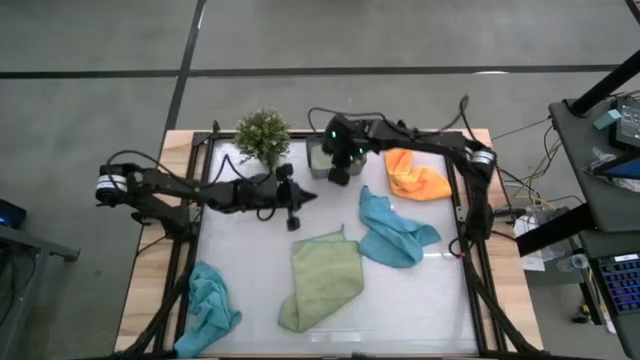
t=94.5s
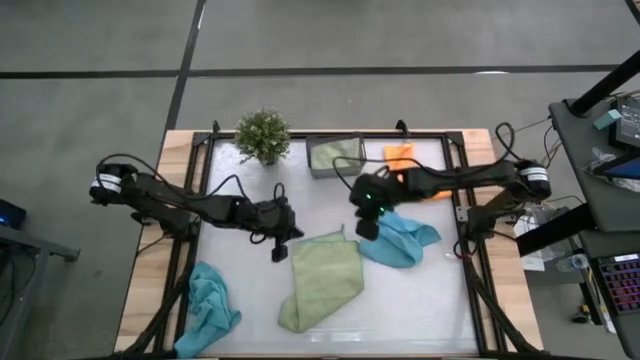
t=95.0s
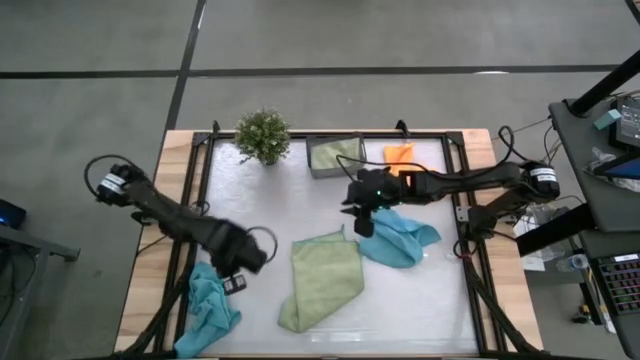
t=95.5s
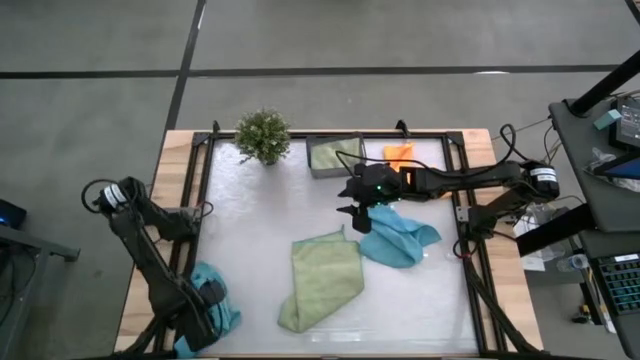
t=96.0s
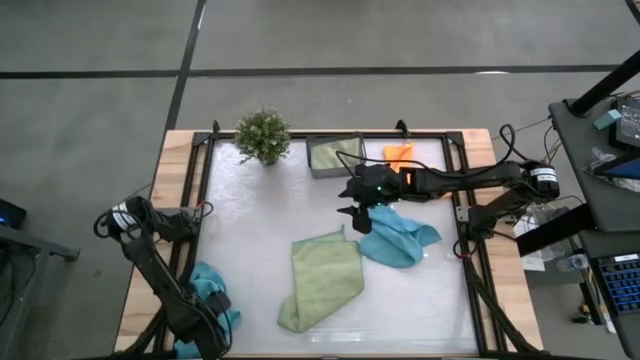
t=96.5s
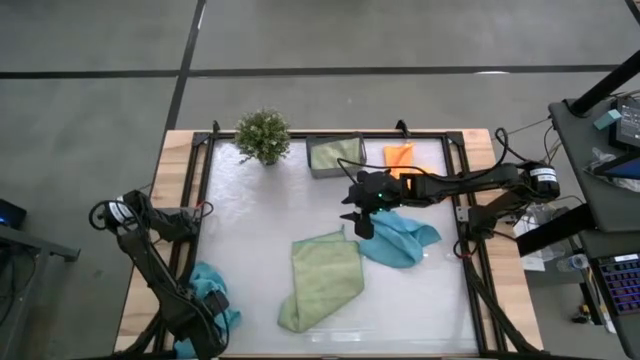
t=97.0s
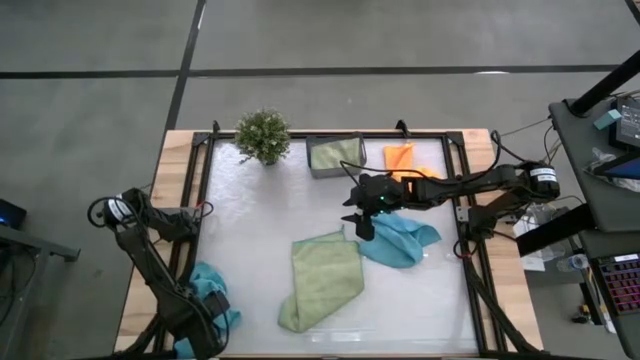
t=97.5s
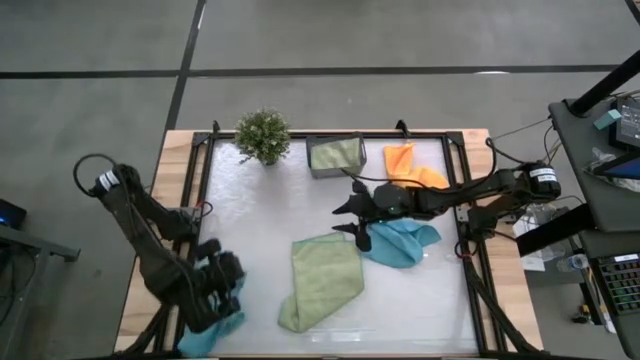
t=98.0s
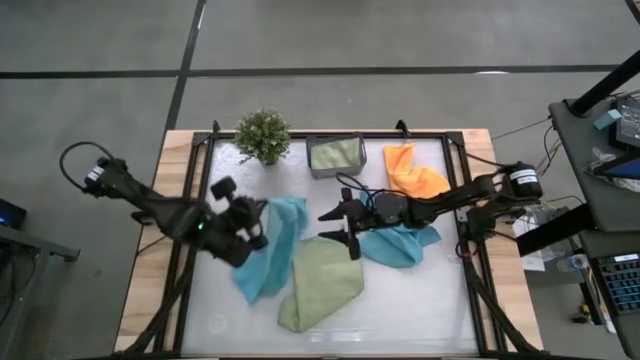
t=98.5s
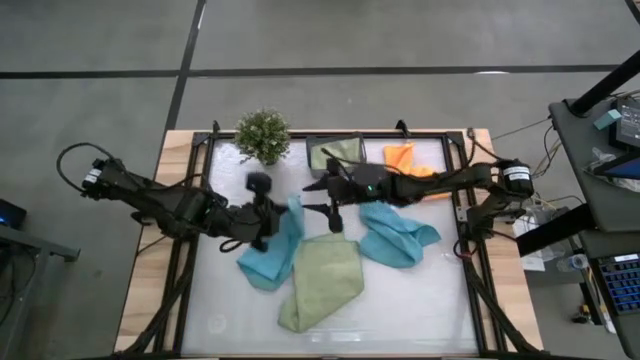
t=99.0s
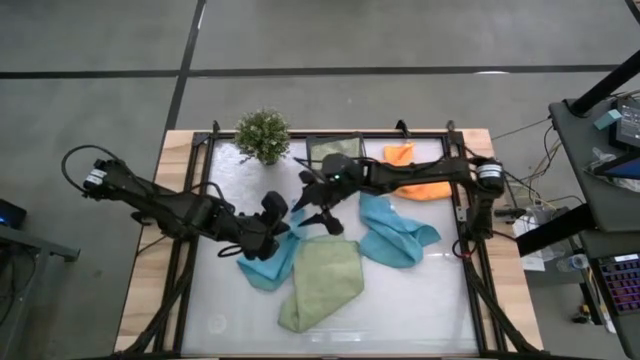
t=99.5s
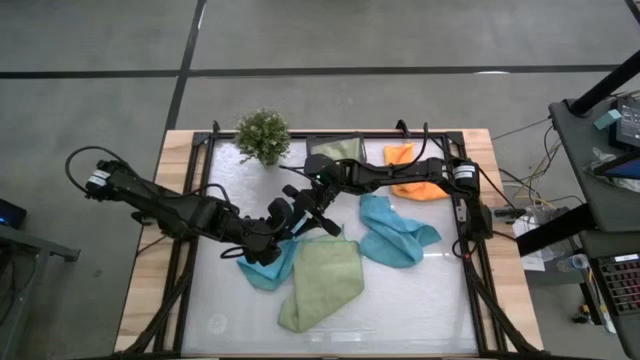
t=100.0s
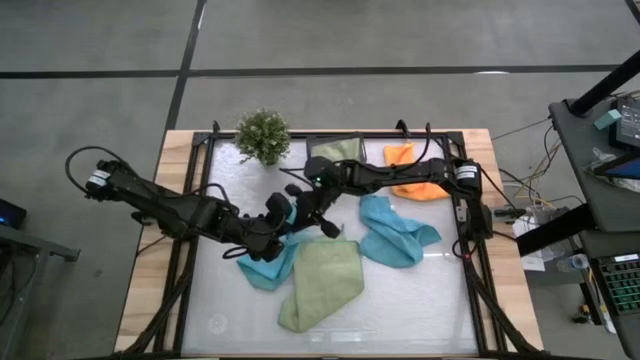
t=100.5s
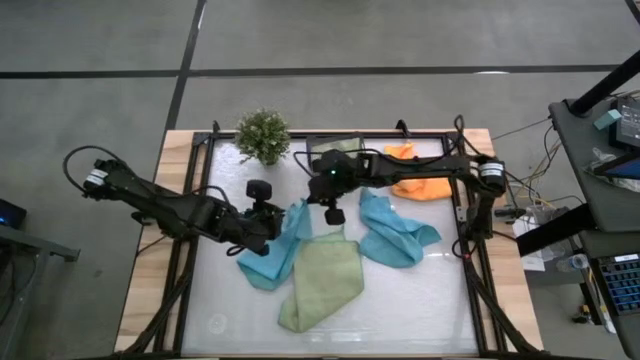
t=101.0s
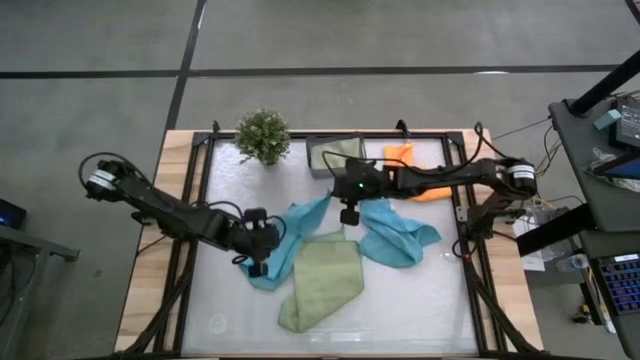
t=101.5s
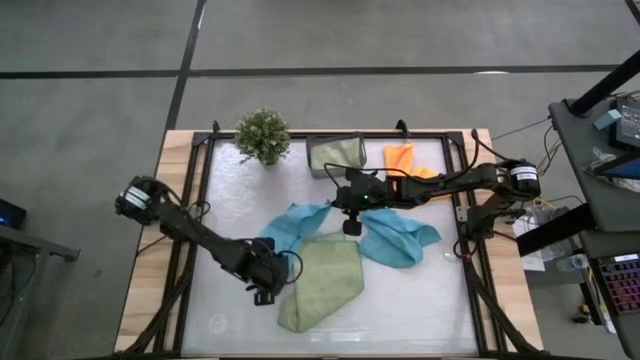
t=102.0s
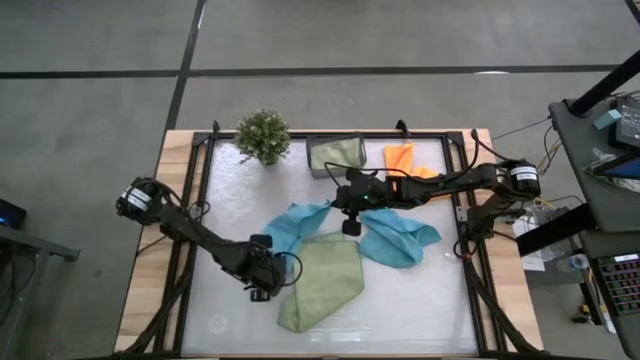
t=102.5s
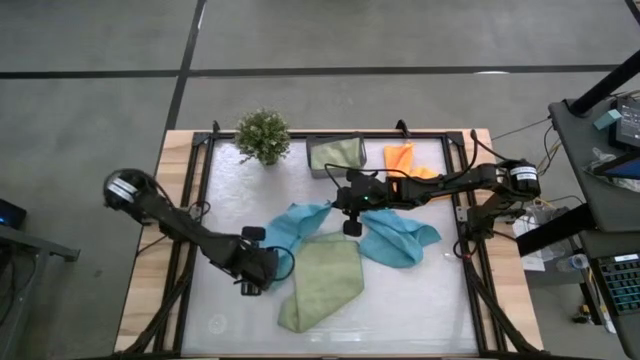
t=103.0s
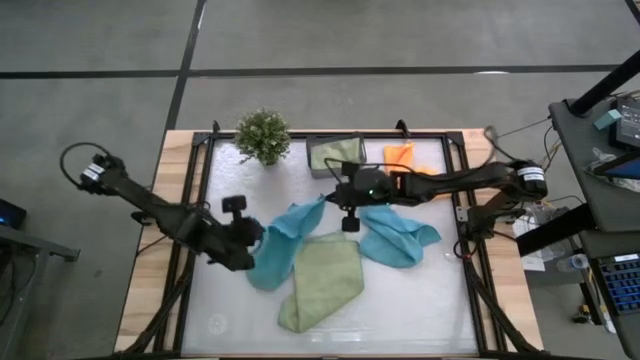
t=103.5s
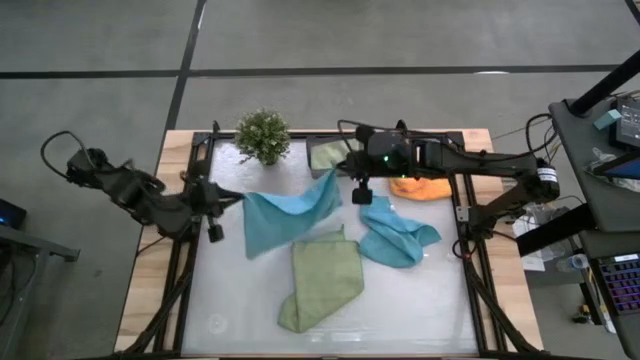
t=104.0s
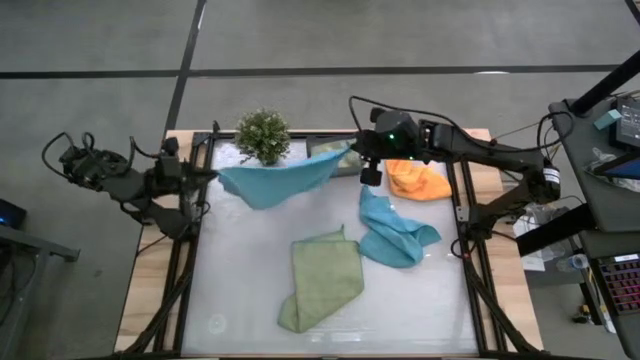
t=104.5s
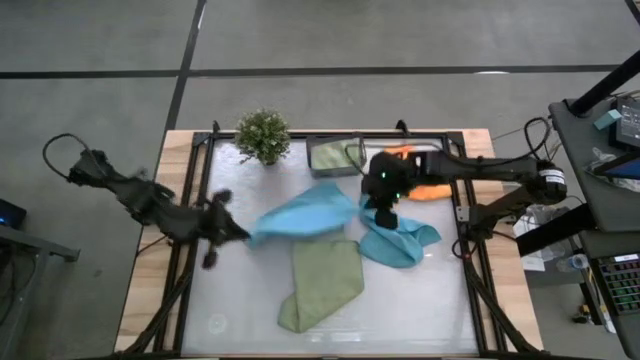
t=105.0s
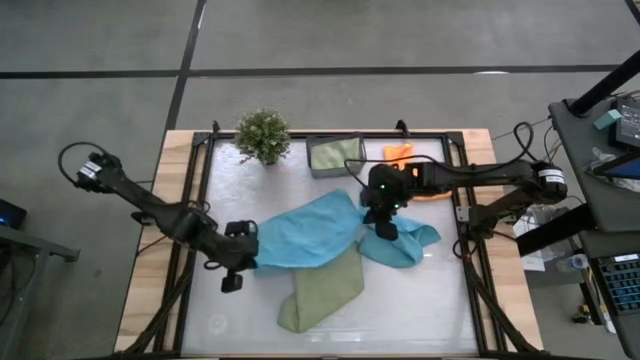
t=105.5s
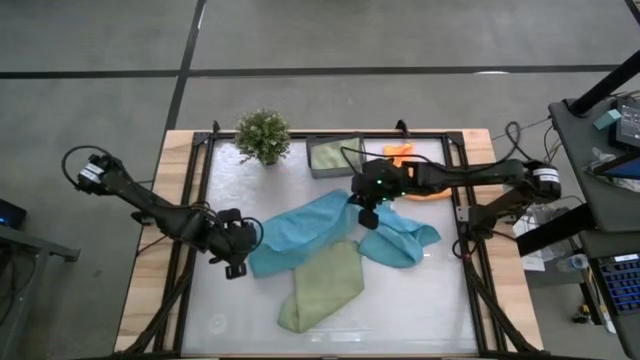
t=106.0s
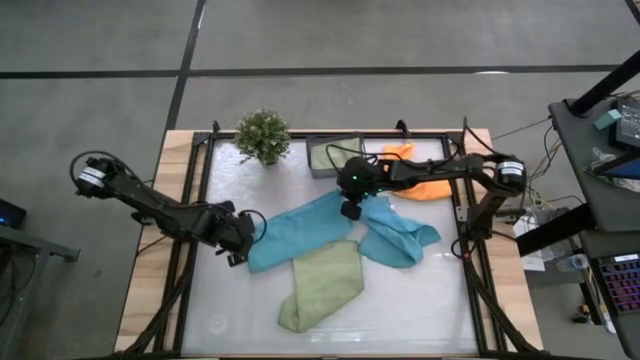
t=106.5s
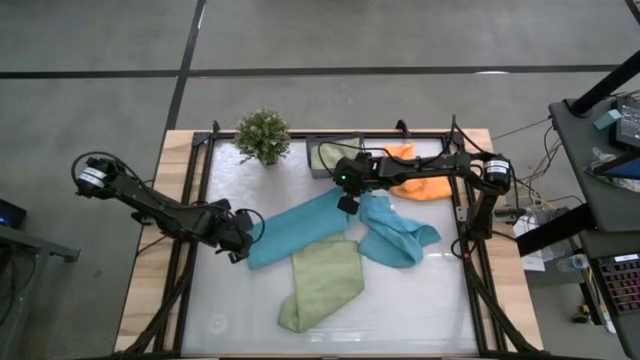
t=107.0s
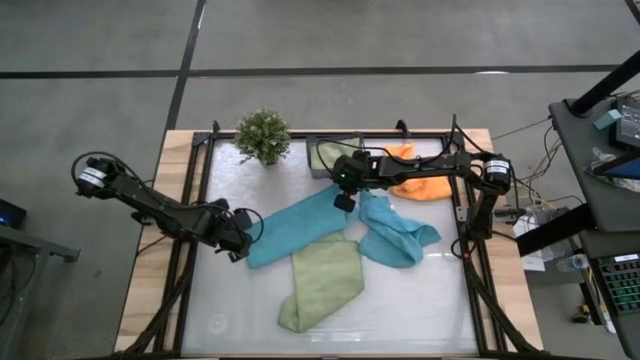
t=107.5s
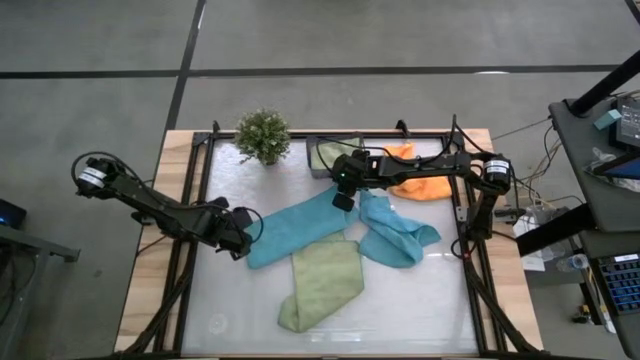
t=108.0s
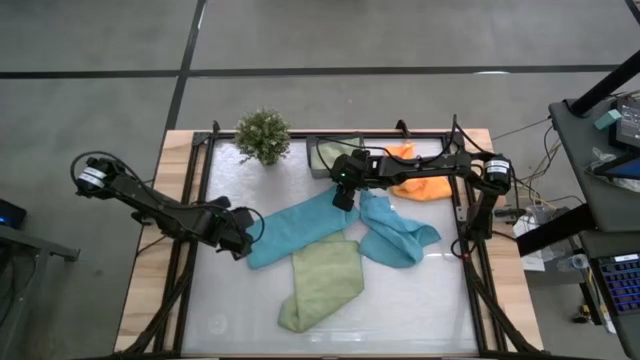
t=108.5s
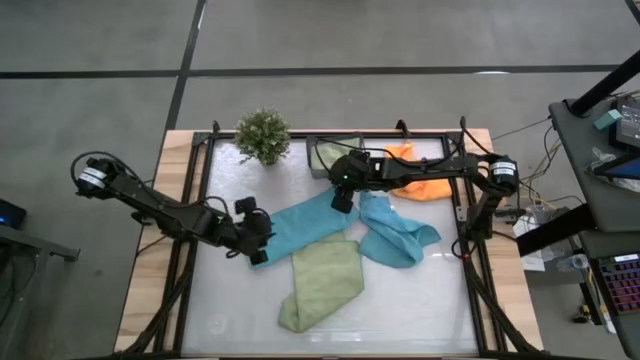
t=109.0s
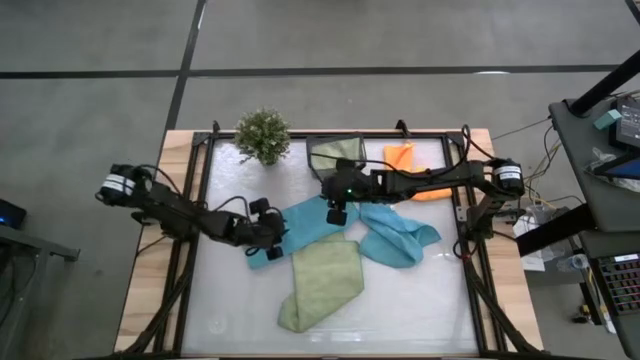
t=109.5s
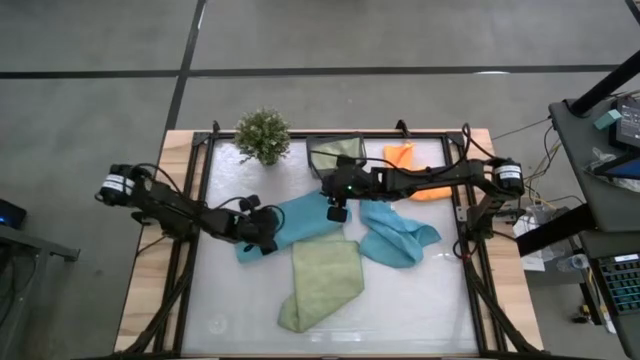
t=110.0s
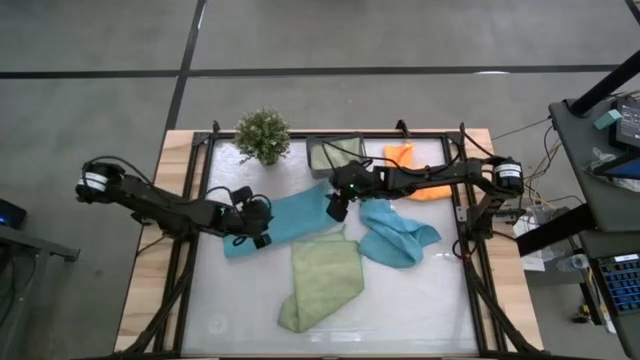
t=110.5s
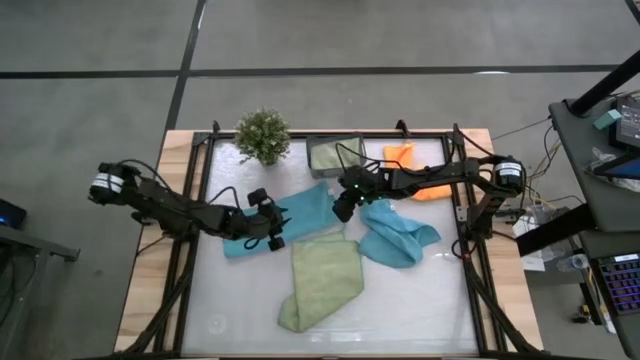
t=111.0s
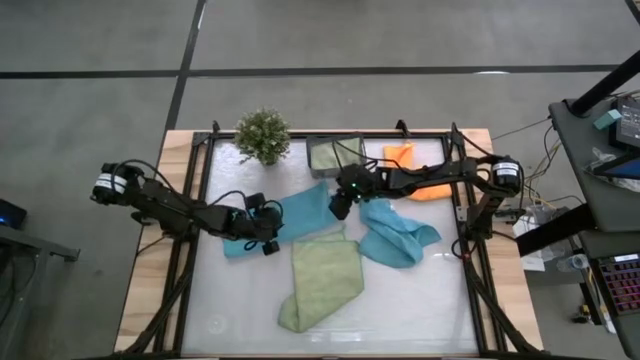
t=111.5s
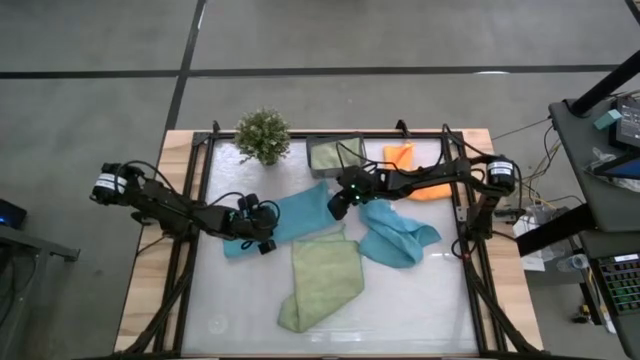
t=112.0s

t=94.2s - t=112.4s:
Task: Fold microfiber towels
Fold the left blue towel

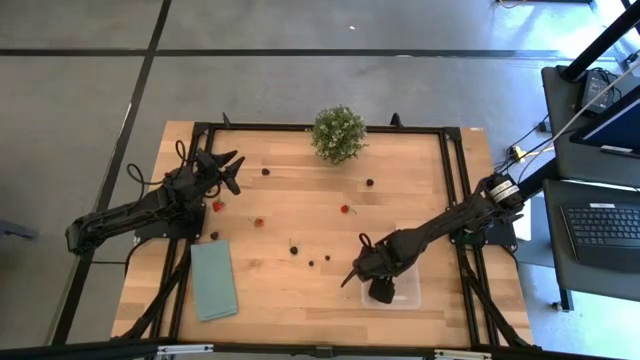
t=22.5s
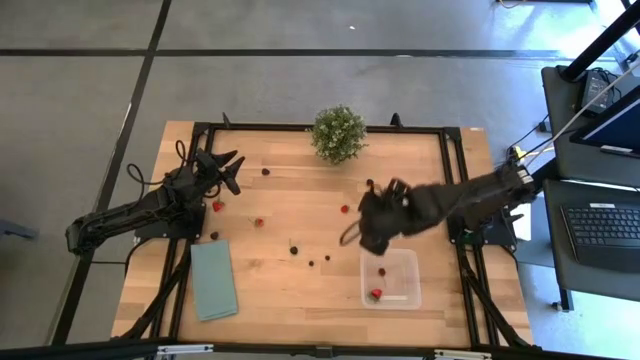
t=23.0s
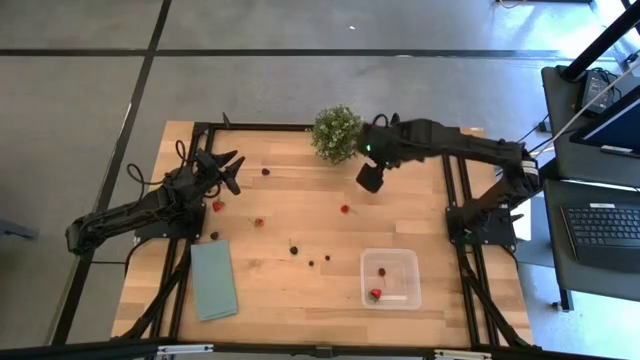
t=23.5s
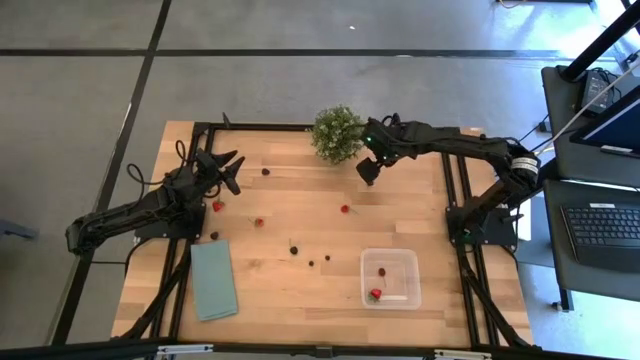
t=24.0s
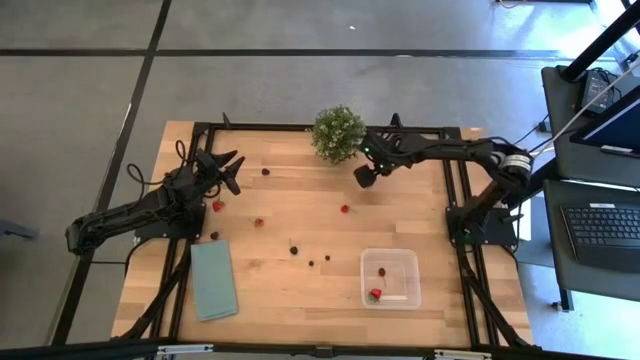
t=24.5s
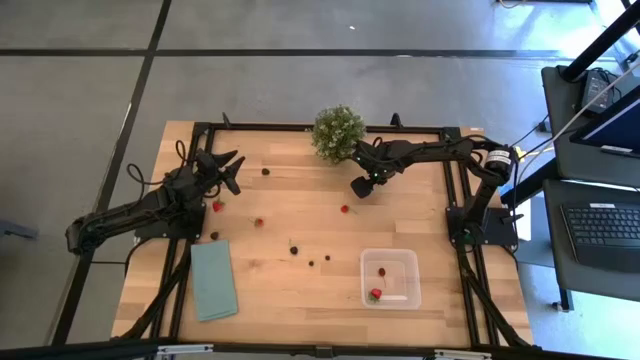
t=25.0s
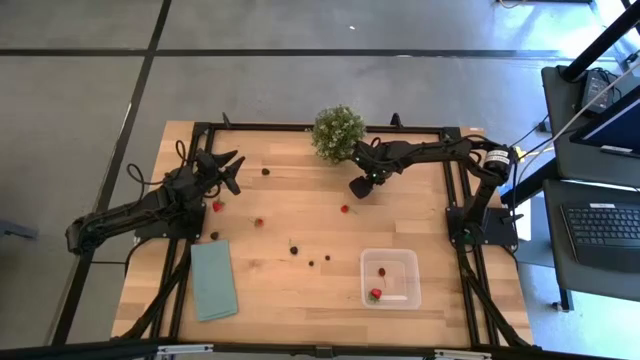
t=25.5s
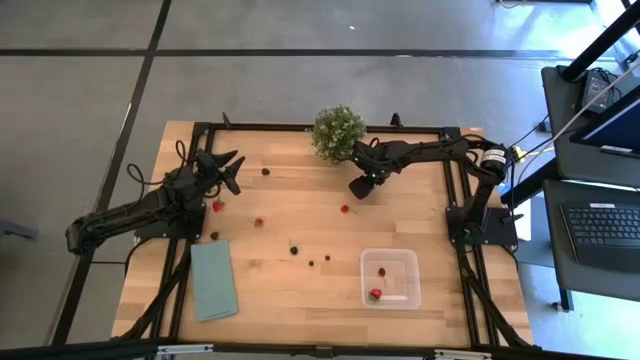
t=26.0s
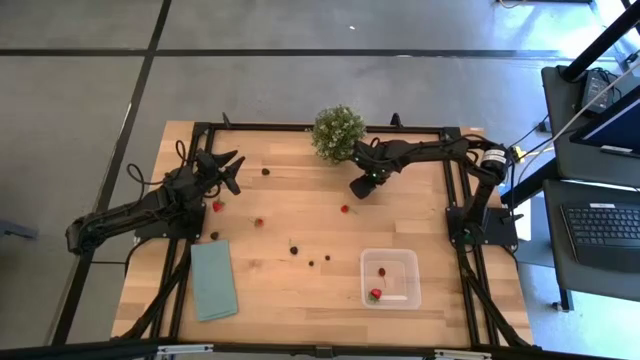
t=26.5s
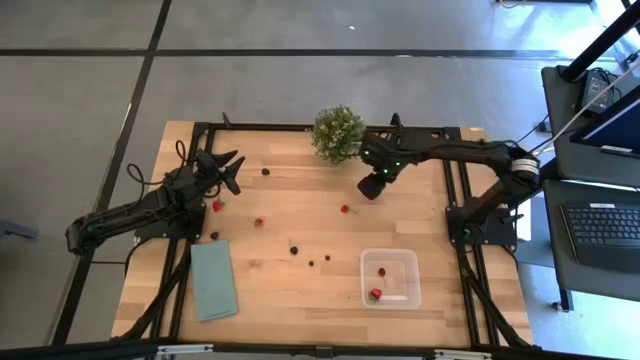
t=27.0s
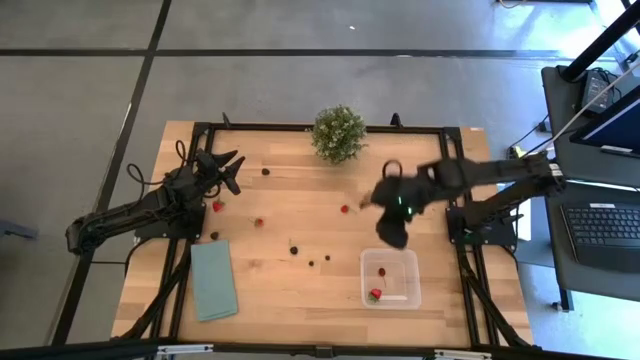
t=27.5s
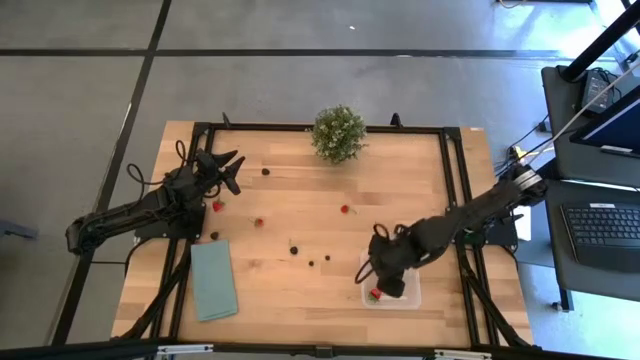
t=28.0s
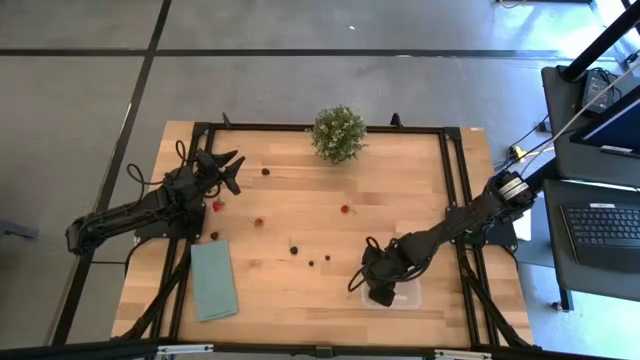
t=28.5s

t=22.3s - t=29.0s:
Task: Pick and placing Produce into tupperware
Put the top black cherry into the bin
